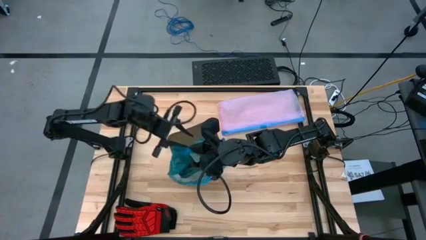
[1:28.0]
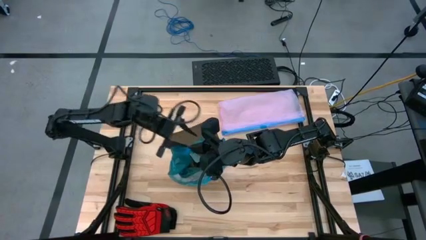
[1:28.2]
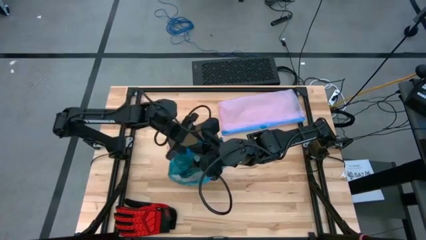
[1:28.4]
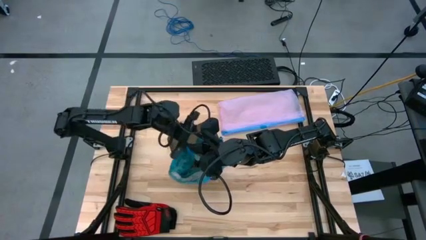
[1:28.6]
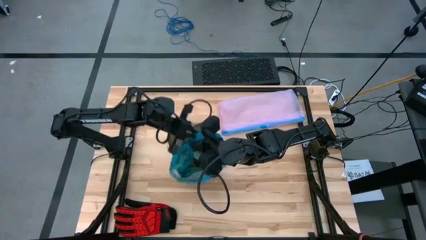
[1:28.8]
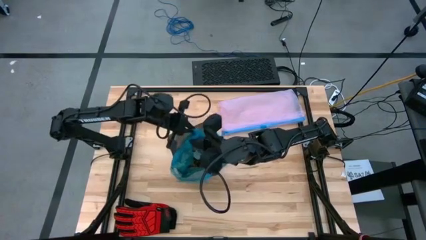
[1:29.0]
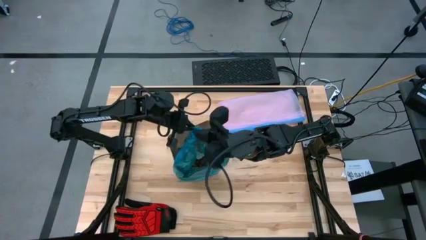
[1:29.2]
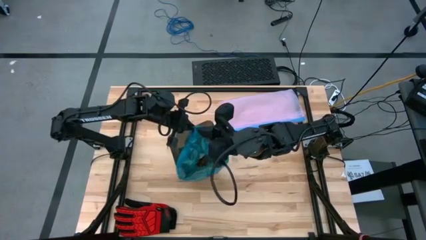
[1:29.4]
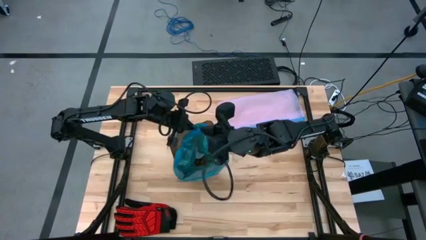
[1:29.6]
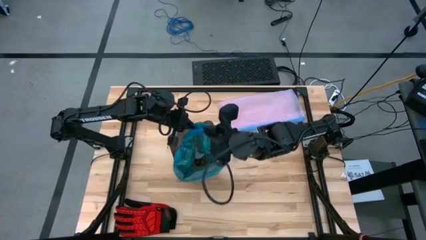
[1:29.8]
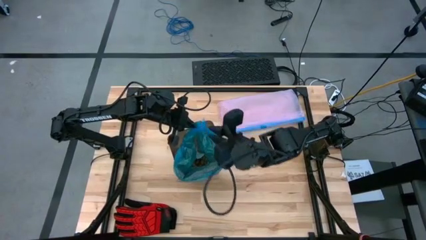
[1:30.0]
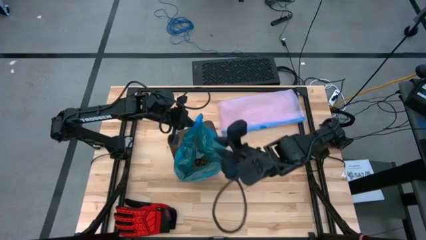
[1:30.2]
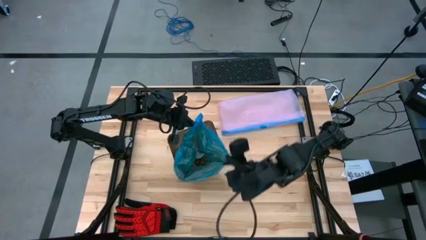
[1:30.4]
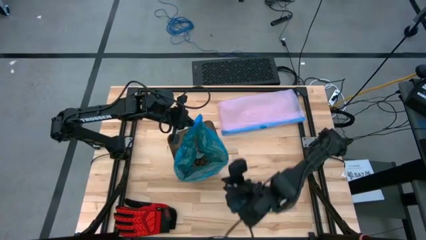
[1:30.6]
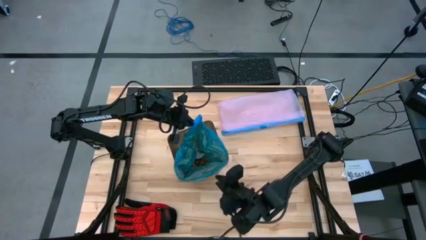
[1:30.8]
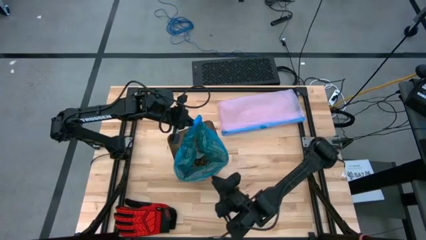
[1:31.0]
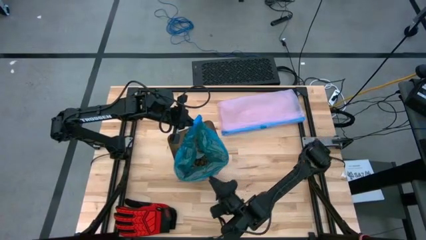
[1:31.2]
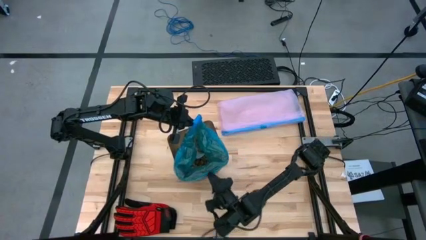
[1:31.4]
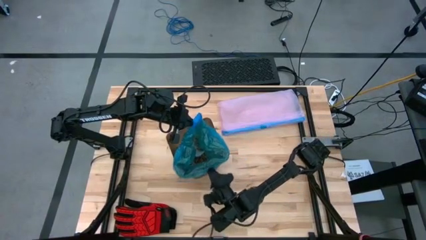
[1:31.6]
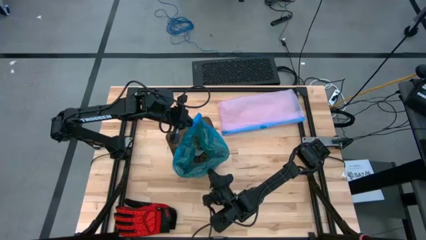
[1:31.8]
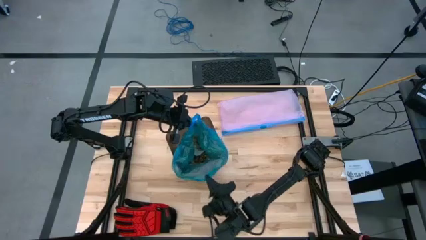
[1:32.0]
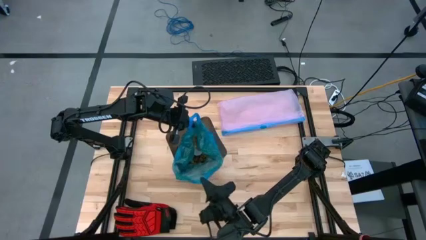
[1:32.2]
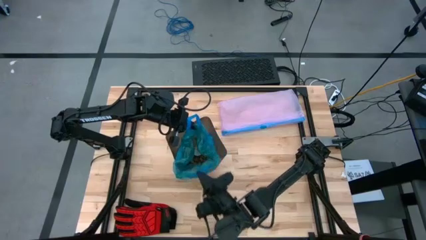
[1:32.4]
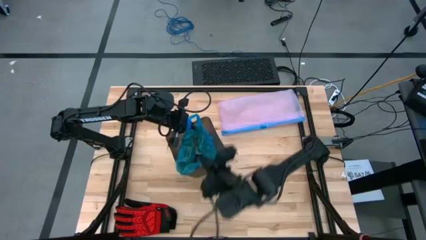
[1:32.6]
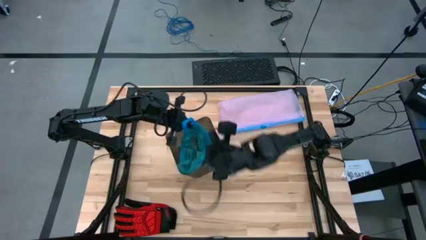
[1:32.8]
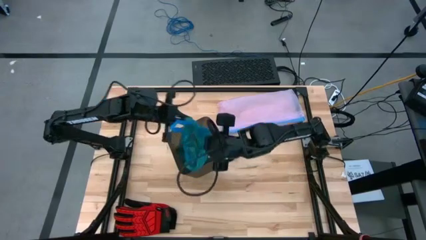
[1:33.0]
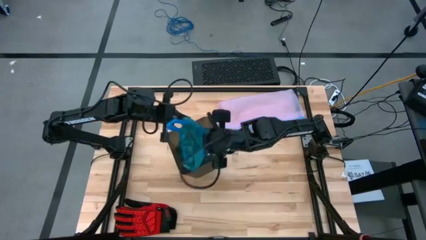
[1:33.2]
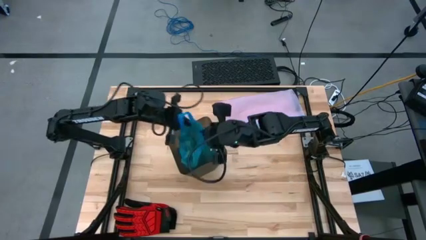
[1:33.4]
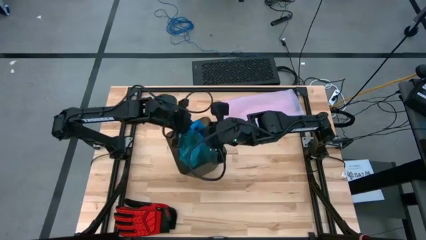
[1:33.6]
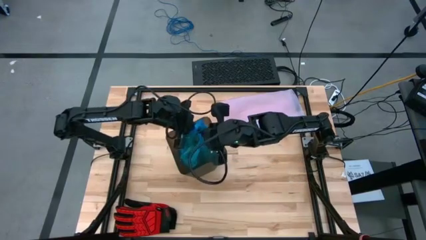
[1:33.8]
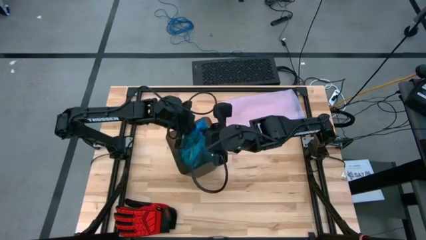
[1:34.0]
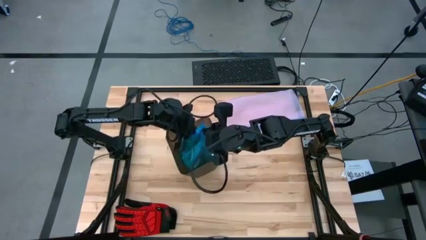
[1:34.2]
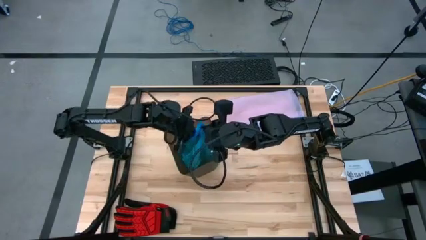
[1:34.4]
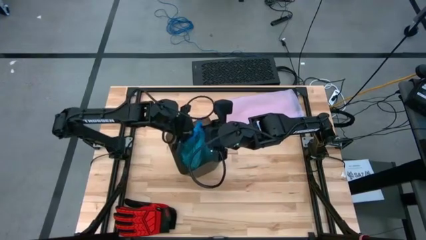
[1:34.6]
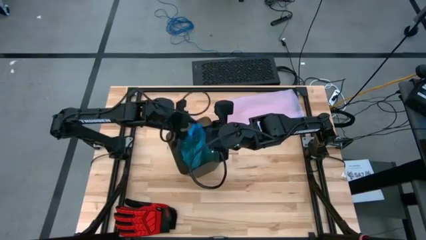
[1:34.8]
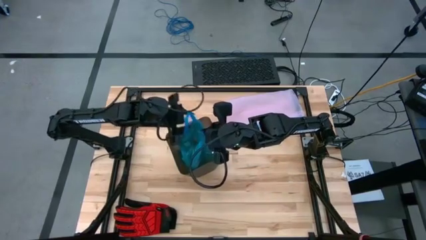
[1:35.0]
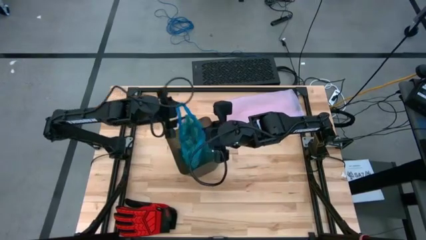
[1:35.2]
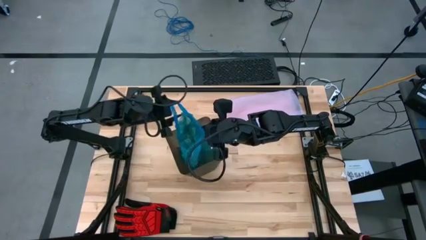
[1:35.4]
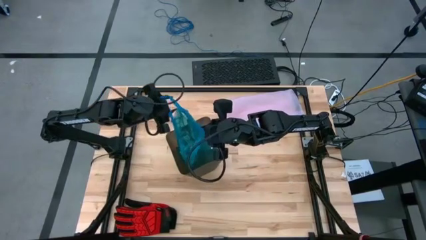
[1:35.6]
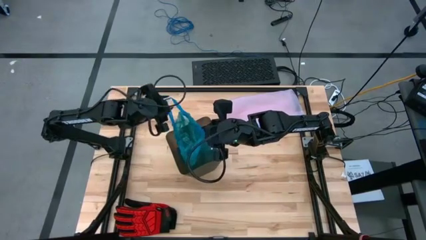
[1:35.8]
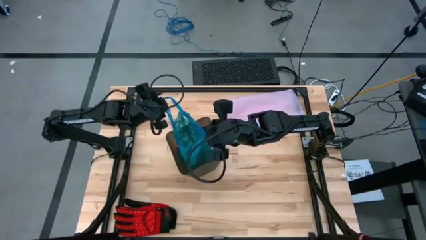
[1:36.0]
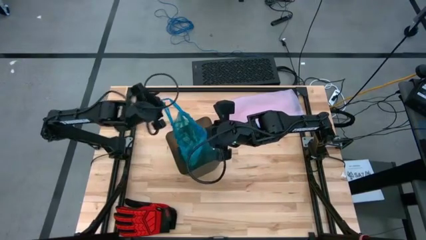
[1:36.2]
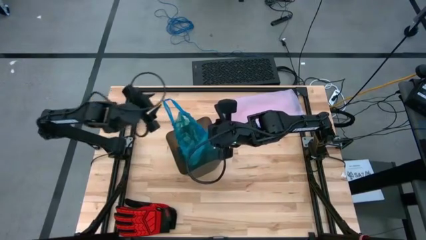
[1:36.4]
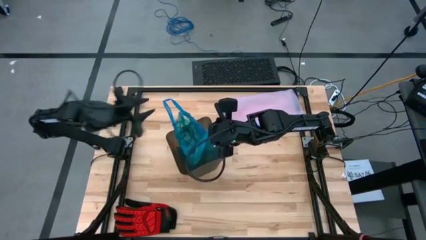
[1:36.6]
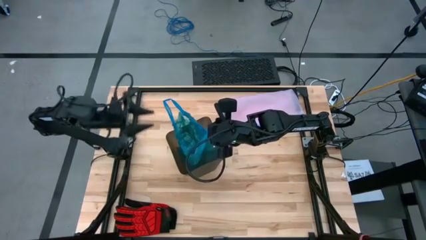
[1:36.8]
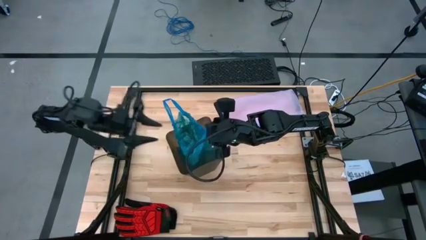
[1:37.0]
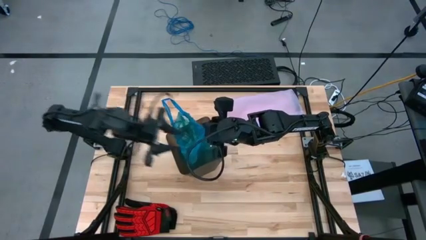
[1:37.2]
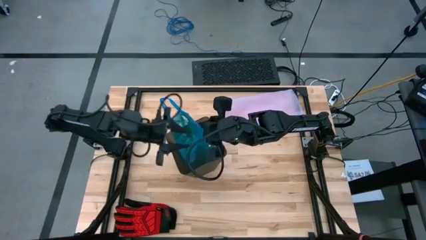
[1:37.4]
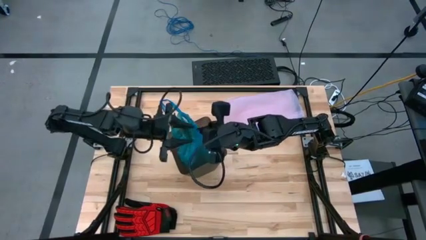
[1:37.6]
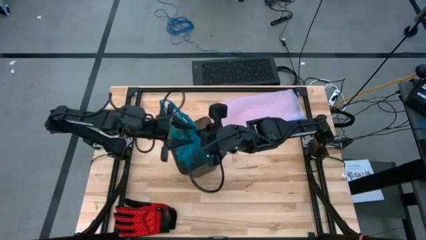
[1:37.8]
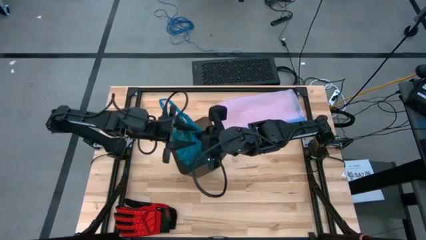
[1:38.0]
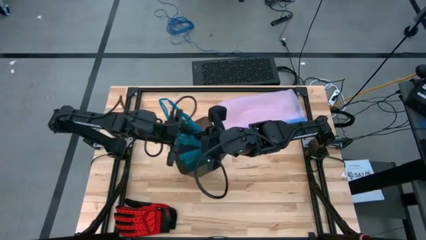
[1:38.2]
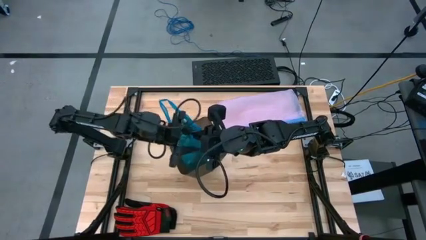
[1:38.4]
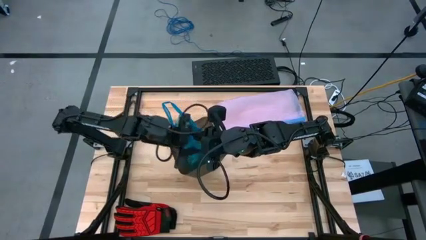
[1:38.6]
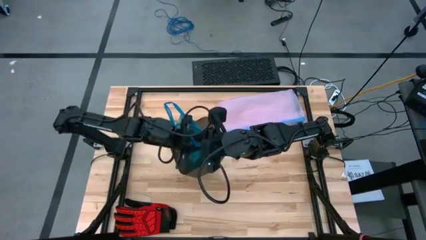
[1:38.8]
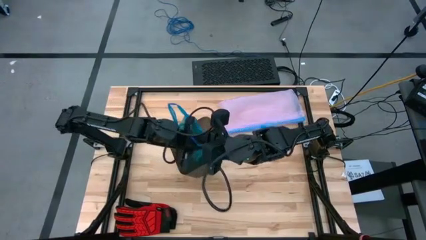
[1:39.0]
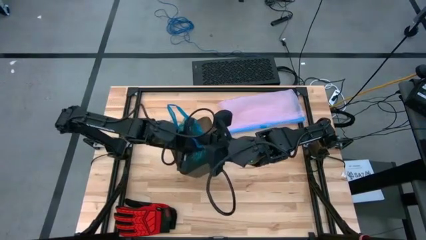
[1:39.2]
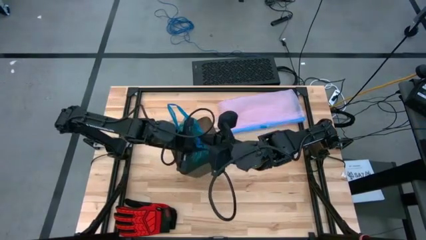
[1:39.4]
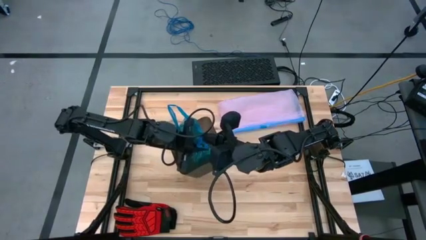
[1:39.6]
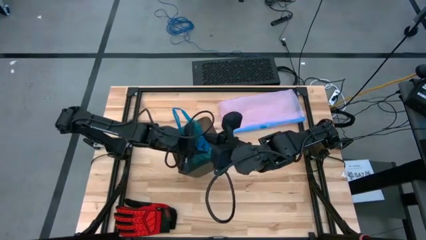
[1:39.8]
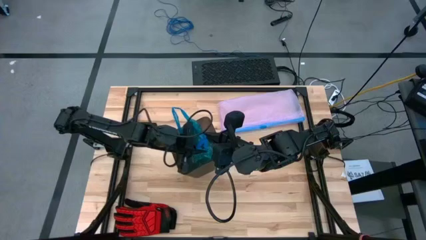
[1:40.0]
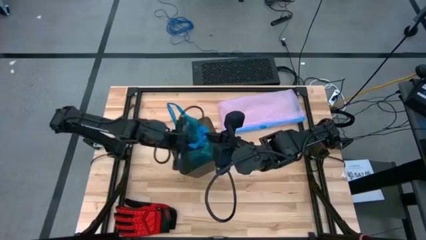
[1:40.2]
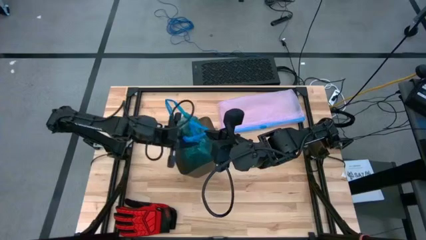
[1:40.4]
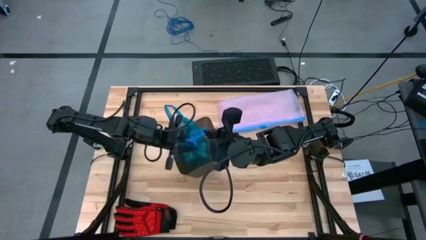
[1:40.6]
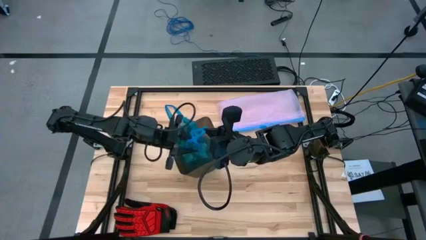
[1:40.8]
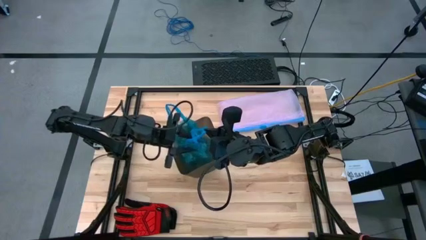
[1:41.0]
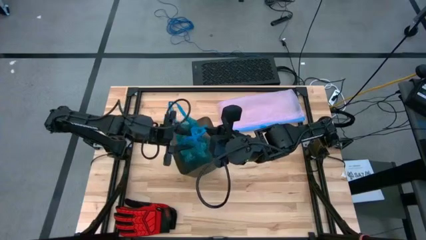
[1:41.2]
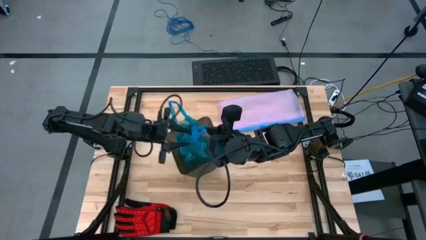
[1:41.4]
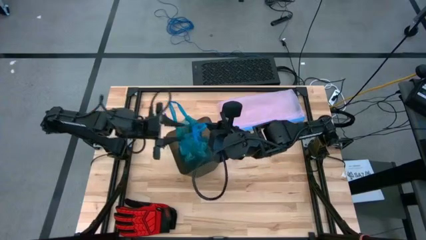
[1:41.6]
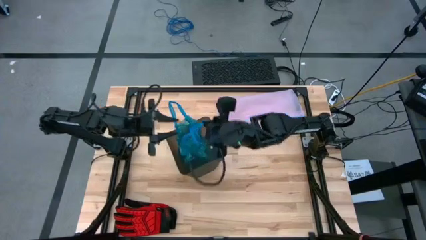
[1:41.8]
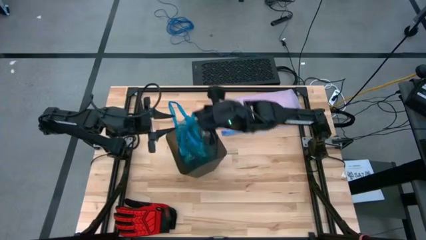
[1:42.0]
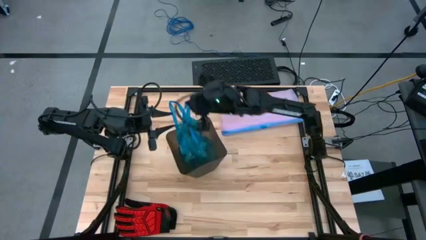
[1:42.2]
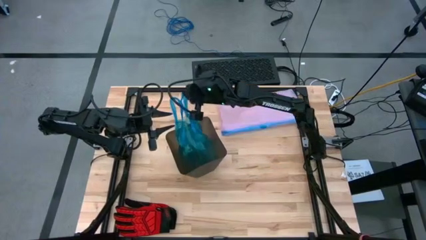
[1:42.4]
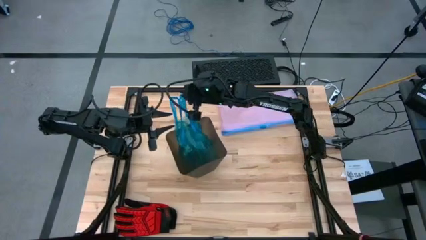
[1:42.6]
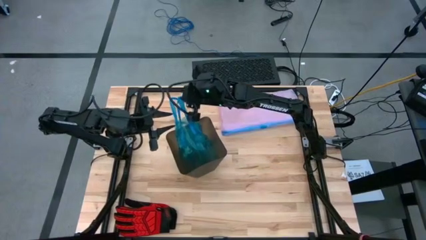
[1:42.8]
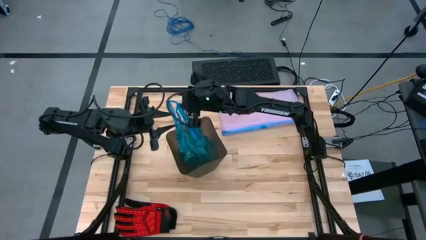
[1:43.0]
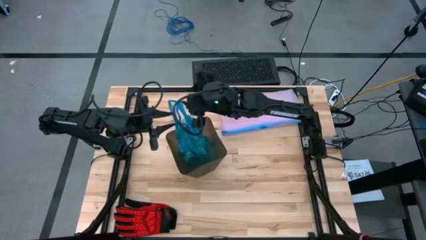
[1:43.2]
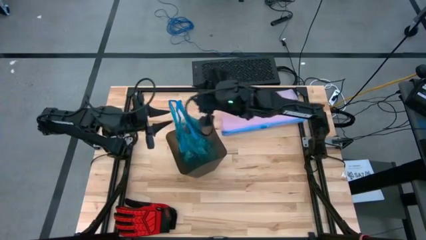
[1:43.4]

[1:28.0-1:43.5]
Task: place trash/remove bag and relplace
Close the trash bag
